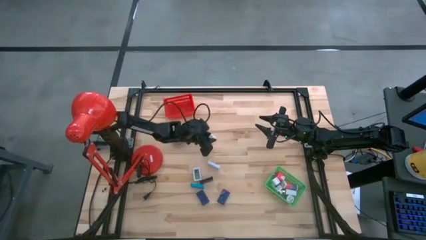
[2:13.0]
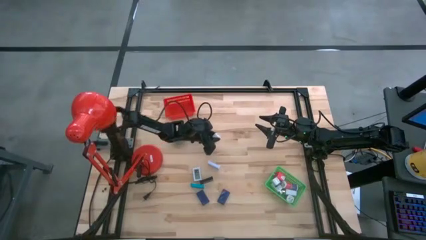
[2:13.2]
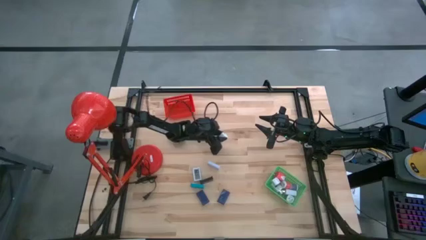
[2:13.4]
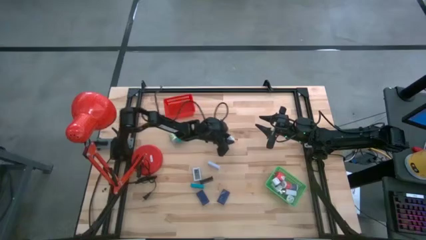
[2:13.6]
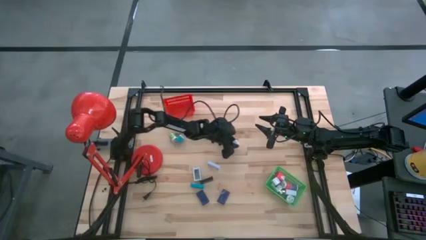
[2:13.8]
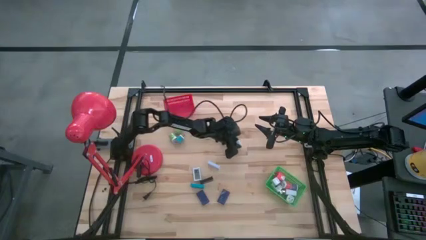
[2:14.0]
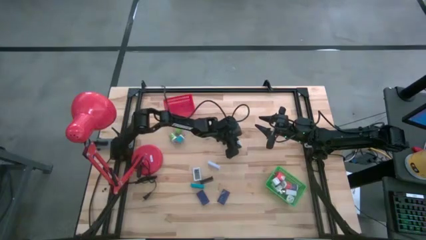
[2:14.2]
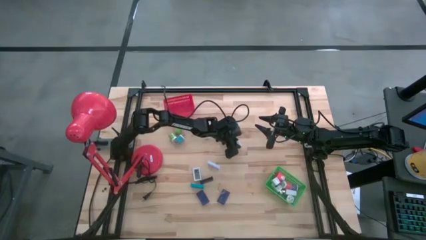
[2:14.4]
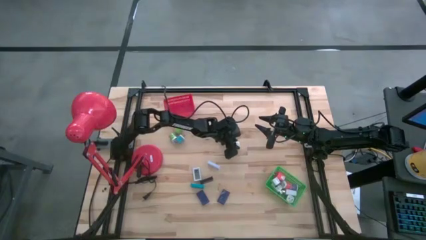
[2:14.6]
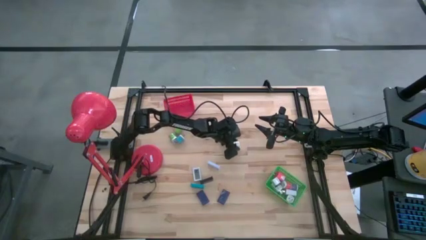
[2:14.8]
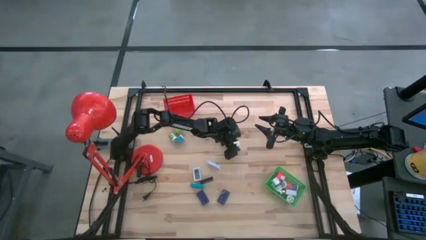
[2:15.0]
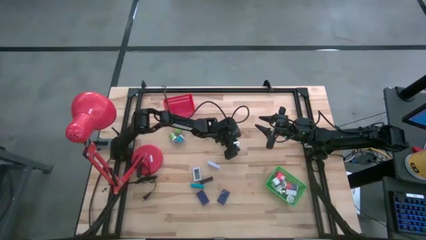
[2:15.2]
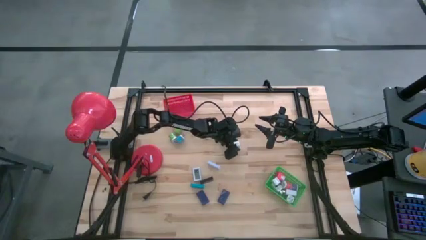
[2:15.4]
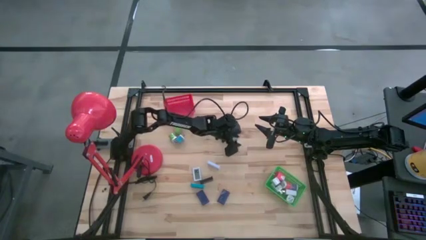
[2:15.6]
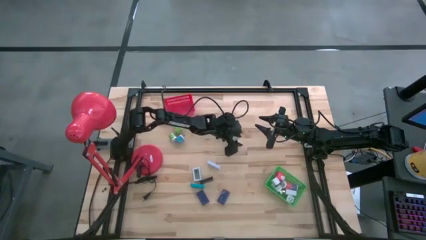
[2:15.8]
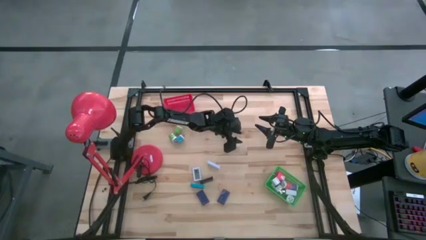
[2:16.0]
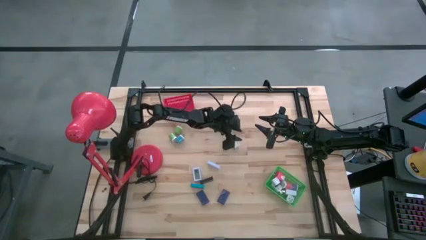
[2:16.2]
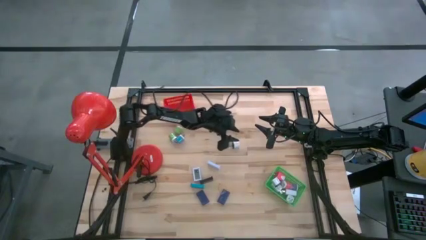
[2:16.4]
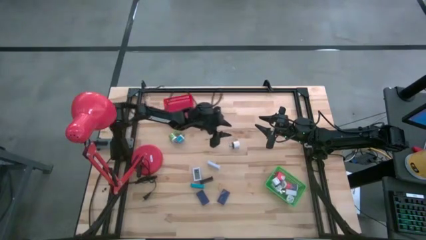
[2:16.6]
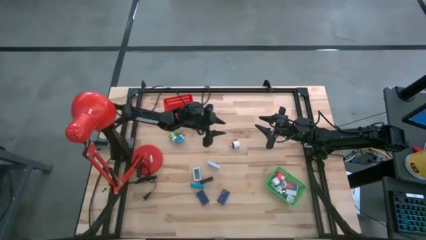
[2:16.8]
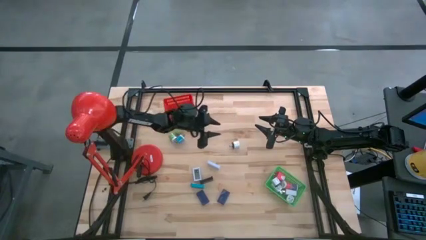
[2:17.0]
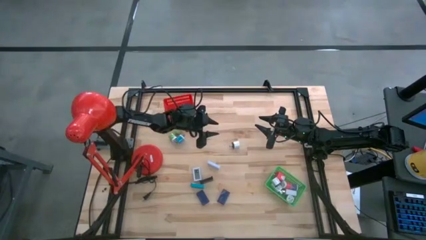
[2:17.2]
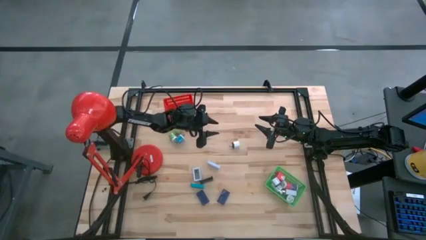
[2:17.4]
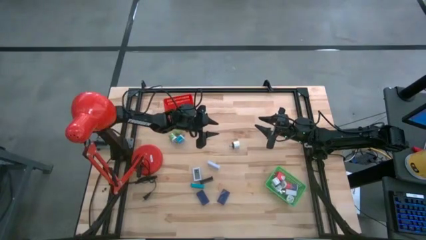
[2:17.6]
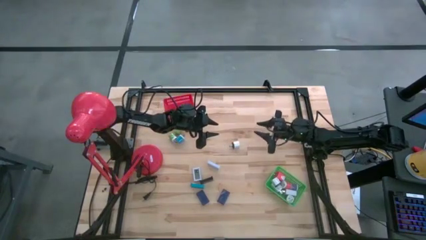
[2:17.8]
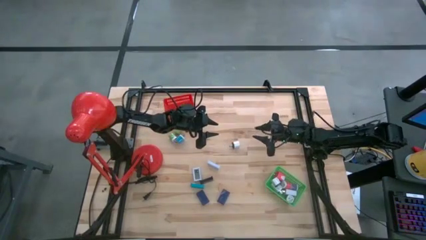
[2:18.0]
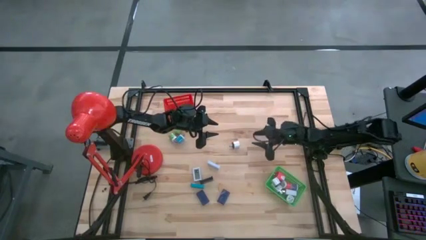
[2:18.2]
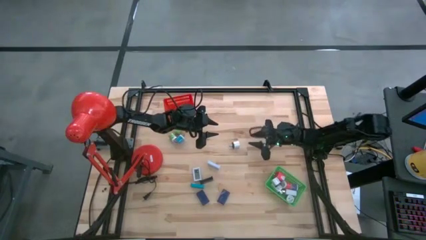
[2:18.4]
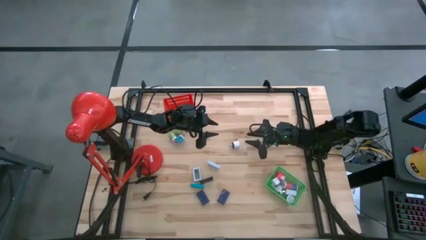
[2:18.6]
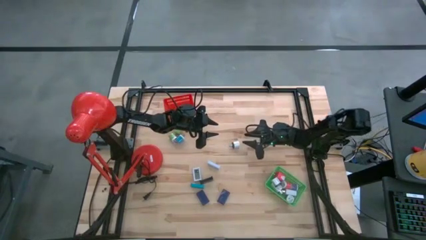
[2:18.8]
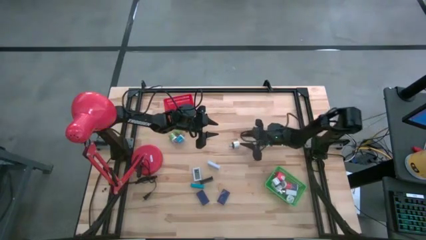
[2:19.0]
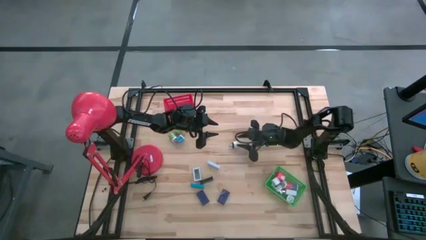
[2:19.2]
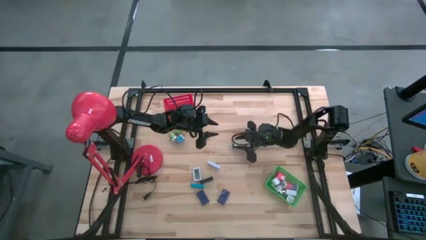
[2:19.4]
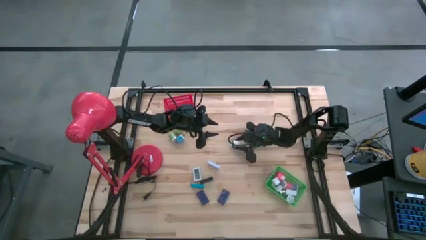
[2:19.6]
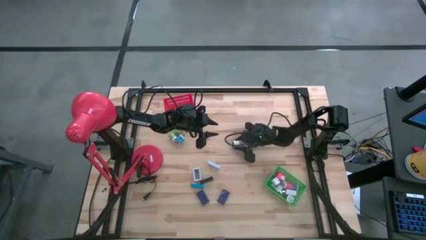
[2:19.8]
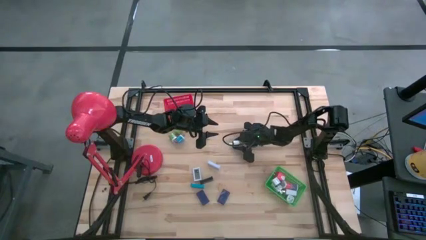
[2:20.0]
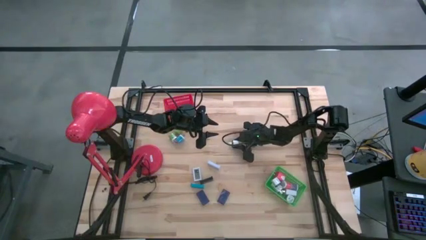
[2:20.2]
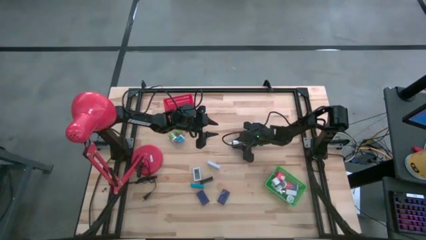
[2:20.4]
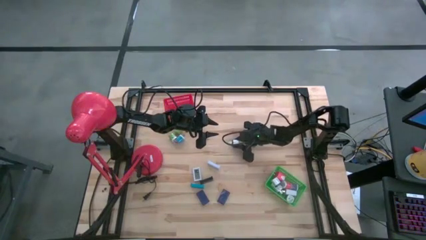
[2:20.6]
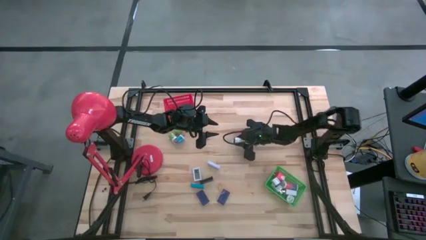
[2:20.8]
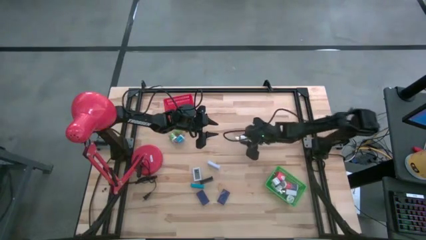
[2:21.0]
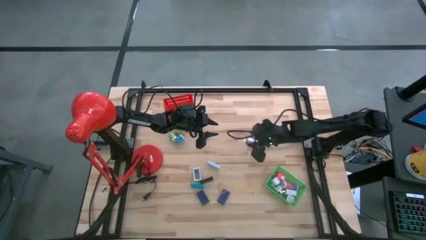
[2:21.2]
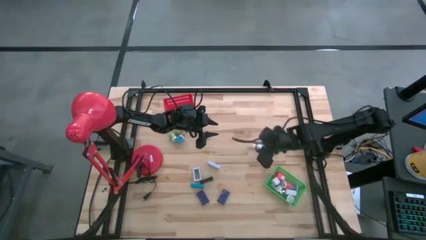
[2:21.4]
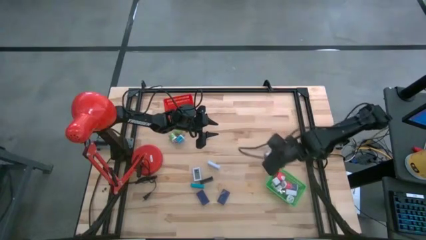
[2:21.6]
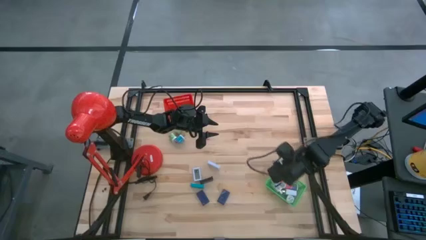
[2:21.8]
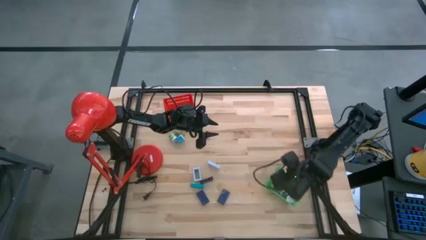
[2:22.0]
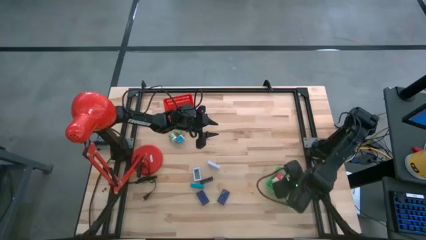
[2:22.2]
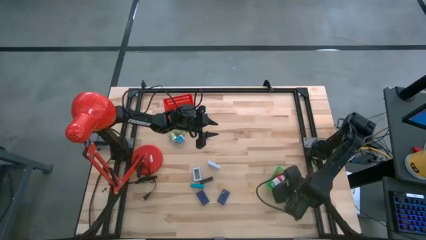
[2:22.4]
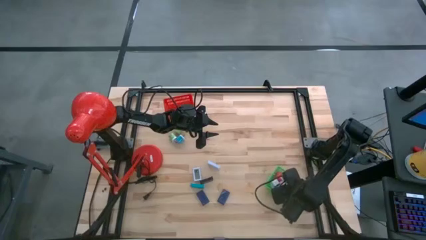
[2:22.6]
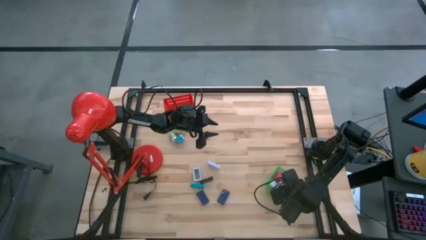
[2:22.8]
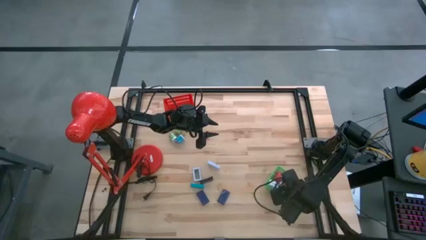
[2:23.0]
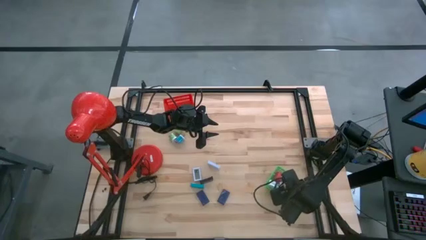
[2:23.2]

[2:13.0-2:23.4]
Task: Pick & Place Office items
Put the white black charger adapter into the green bin

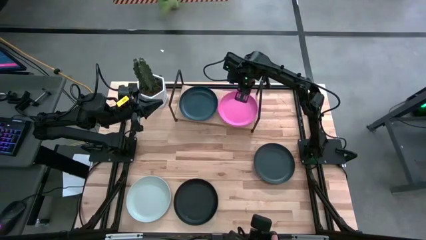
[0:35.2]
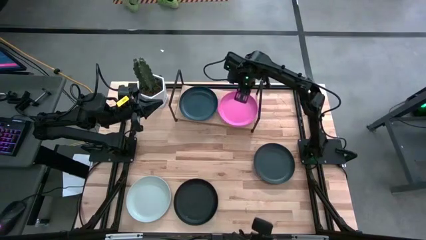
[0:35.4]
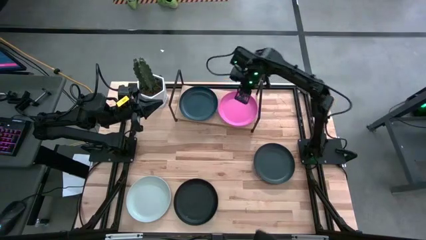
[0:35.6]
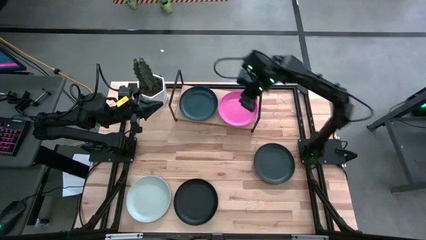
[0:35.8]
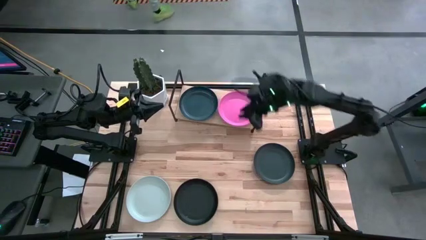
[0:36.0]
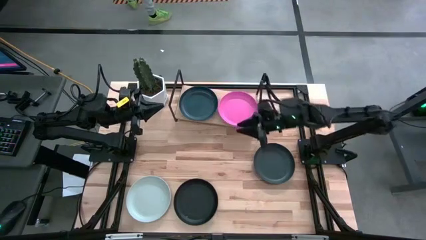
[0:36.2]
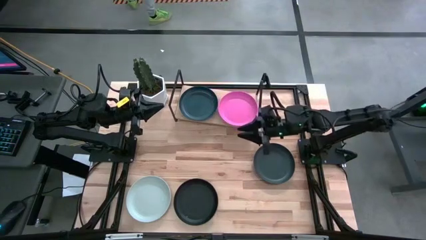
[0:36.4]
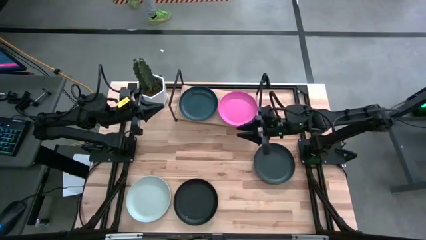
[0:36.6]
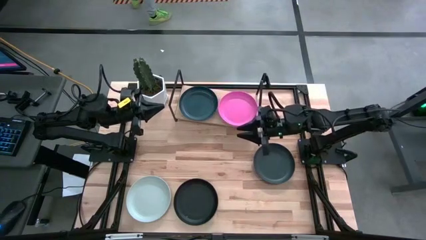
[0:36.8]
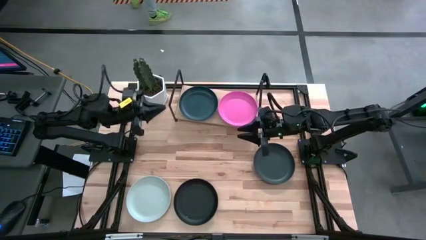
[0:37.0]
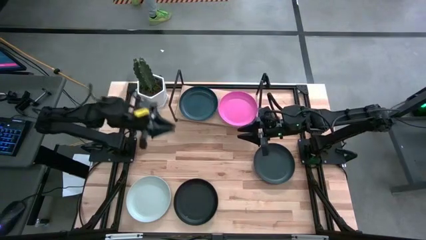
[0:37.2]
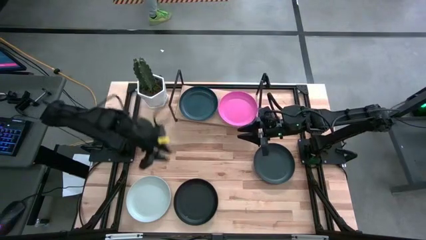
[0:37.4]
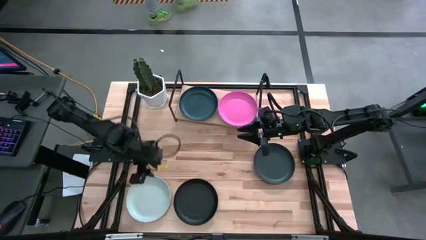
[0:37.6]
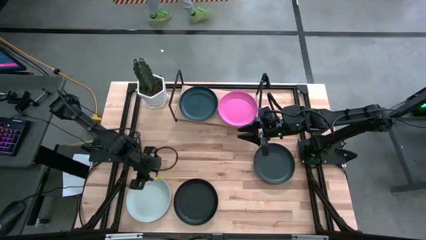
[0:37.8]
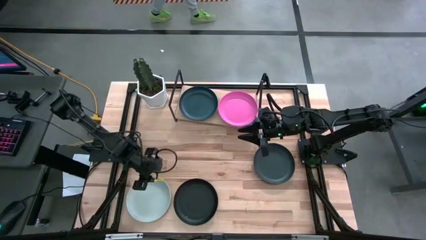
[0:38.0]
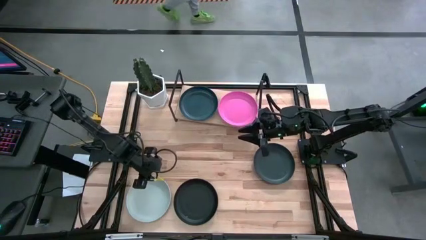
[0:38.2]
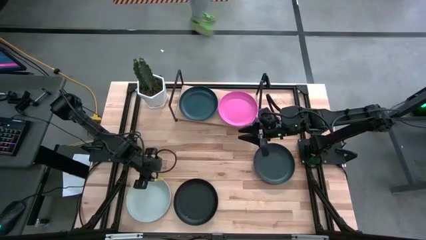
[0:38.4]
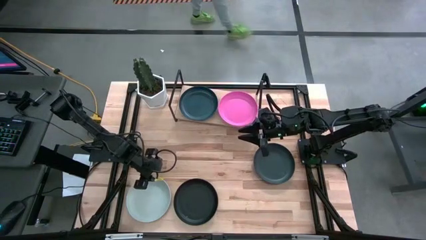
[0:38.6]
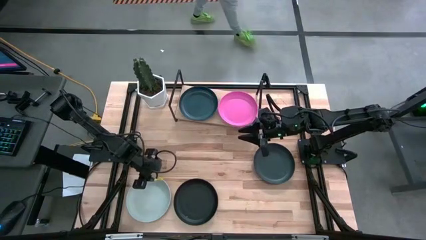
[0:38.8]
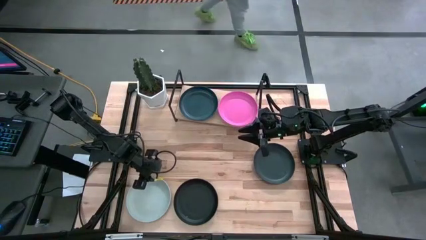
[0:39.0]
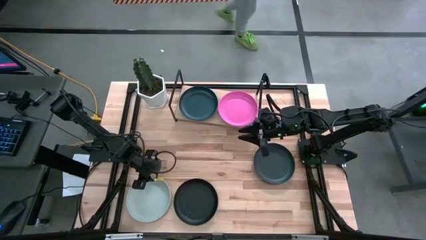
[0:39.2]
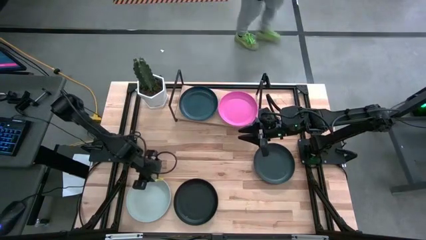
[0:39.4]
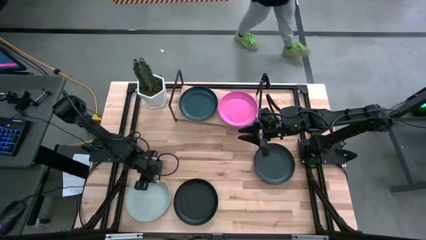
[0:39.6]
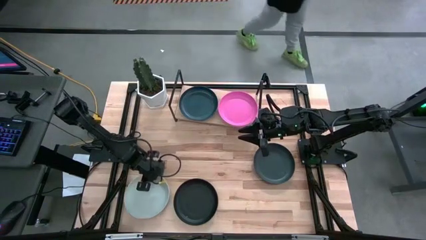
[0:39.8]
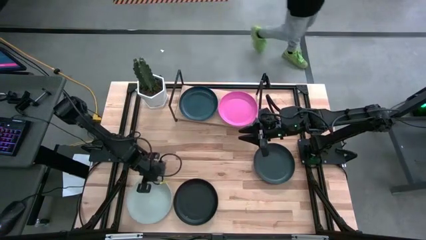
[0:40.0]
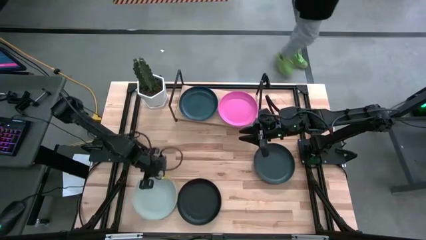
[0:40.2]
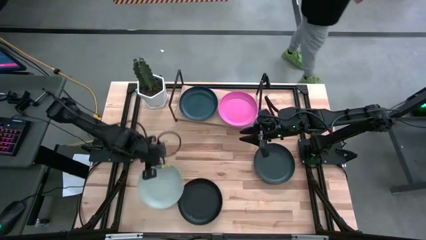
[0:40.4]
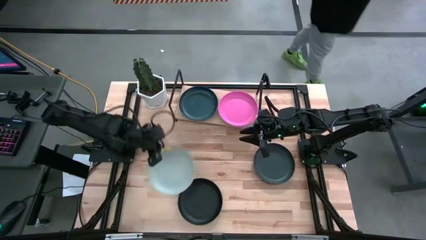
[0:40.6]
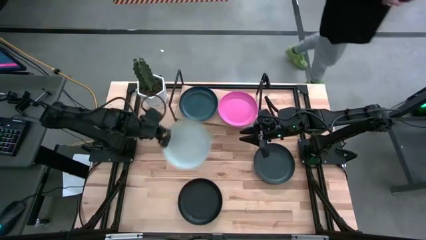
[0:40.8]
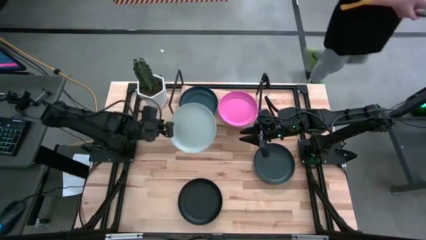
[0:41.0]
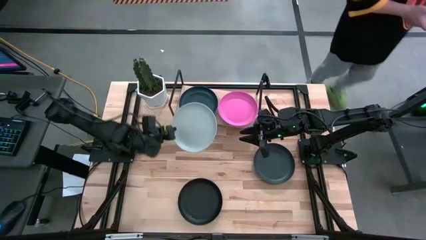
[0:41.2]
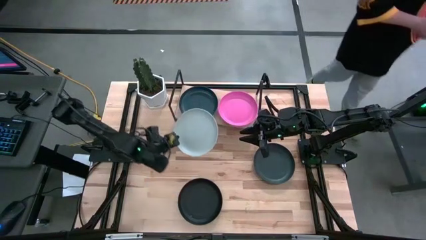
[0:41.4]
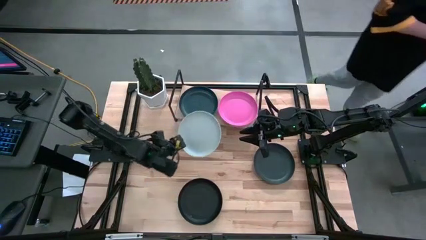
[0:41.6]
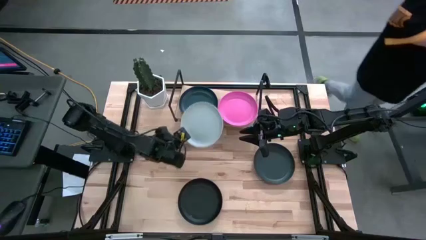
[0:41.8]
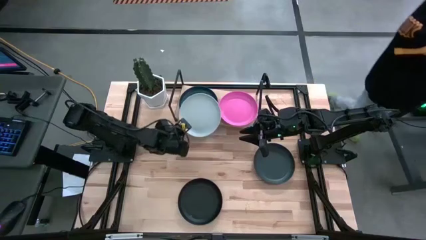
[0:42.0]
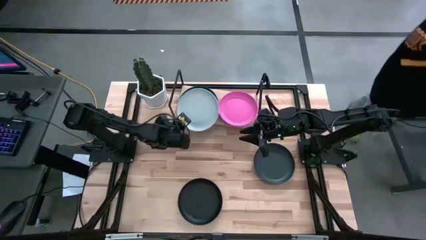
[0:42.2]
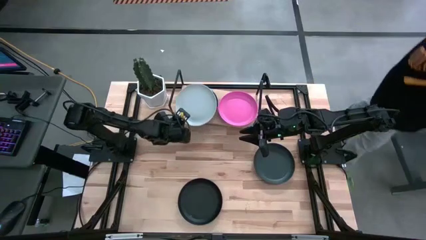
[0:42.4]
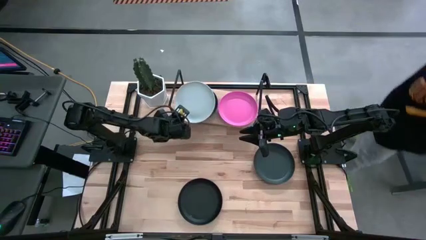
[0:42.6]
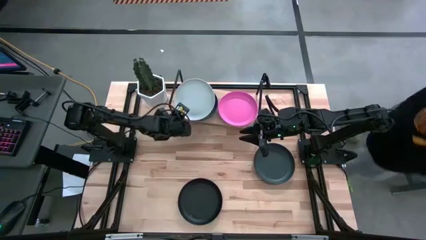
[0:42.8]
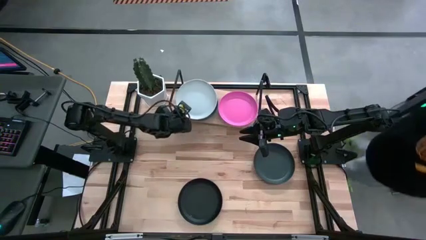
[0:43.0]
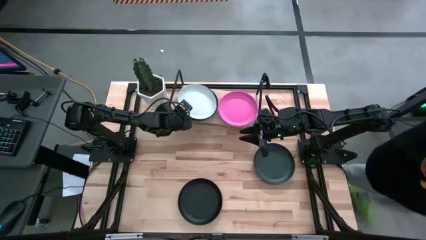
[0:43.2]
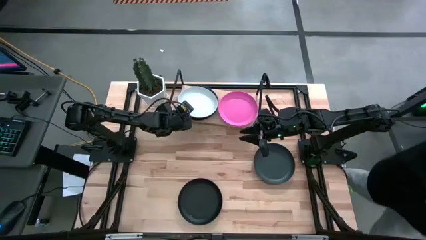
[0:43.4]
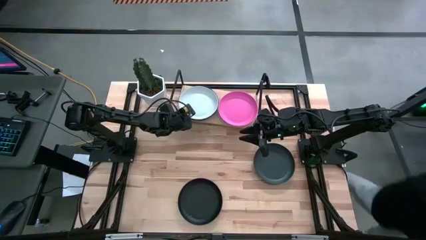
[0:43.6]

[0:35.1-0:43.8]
Task: Place and stack plates onto a shelf
Stack the white plate on top of the dark green plate on the shelf
